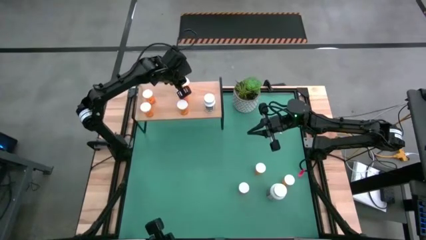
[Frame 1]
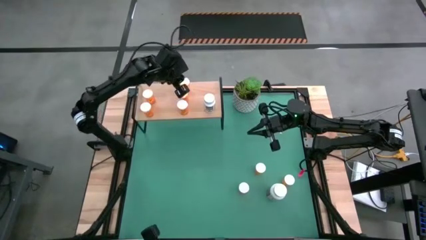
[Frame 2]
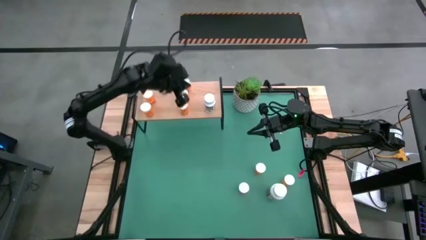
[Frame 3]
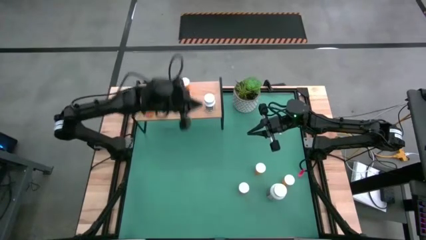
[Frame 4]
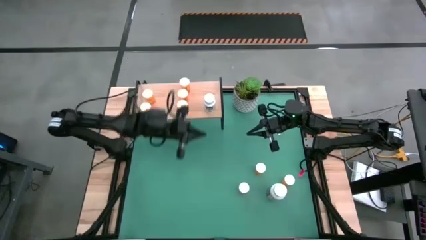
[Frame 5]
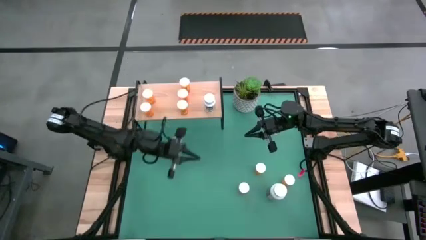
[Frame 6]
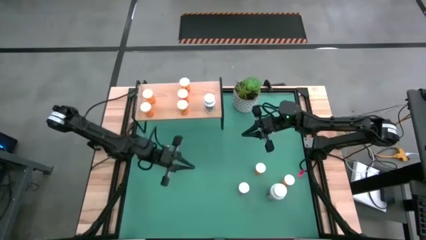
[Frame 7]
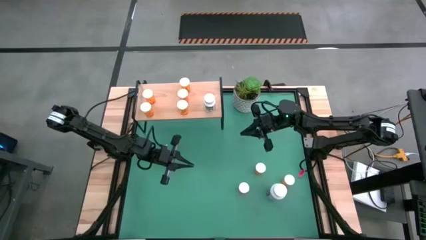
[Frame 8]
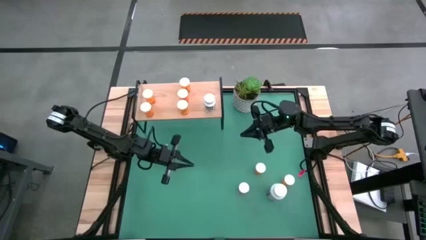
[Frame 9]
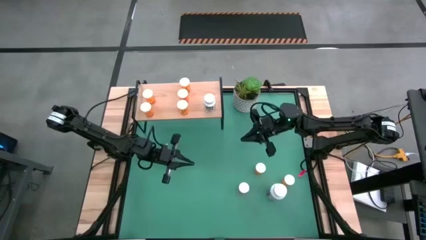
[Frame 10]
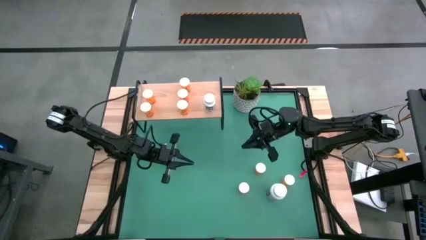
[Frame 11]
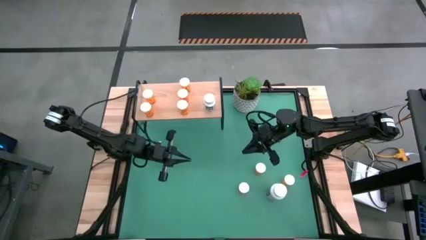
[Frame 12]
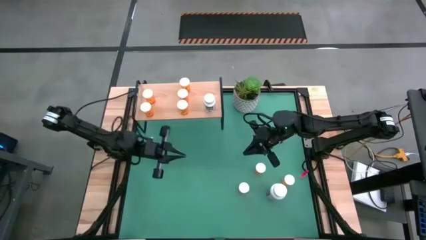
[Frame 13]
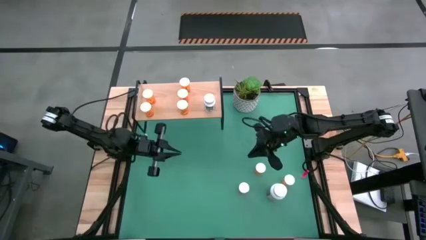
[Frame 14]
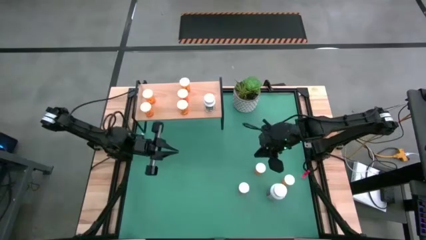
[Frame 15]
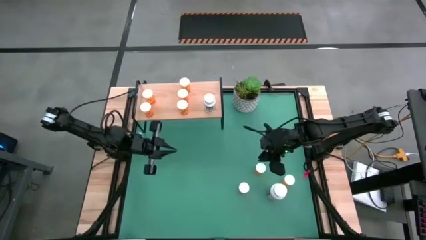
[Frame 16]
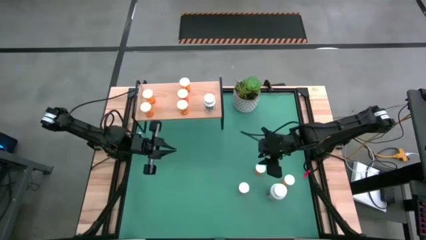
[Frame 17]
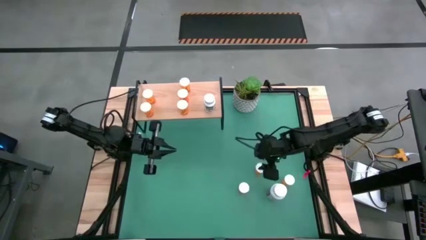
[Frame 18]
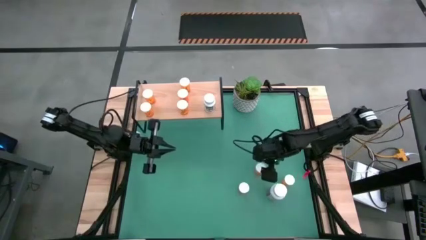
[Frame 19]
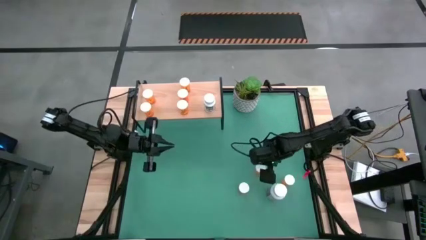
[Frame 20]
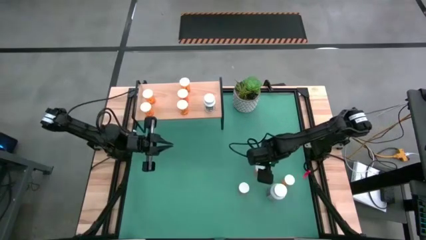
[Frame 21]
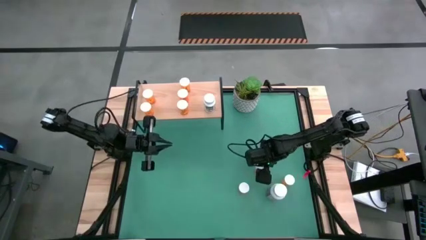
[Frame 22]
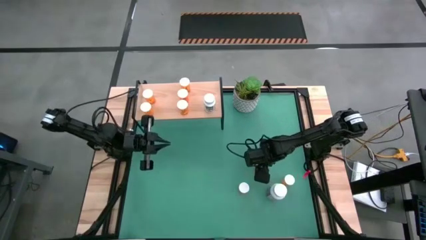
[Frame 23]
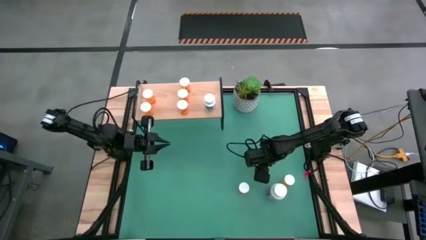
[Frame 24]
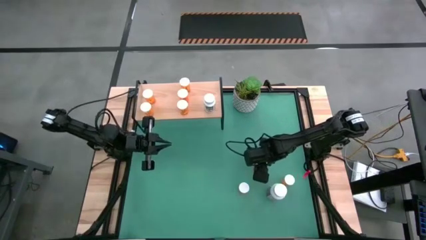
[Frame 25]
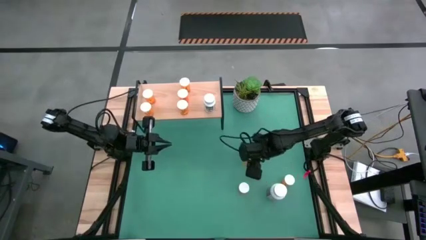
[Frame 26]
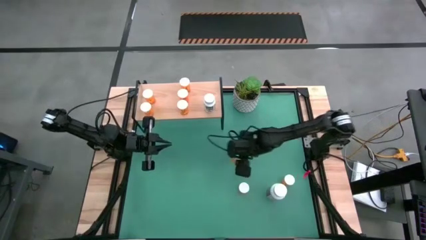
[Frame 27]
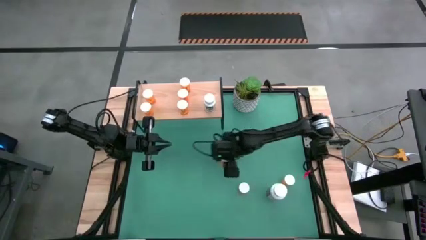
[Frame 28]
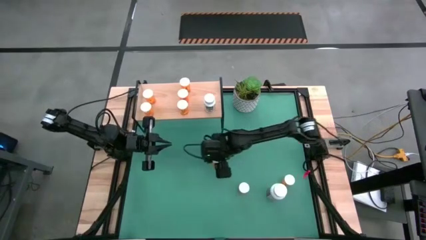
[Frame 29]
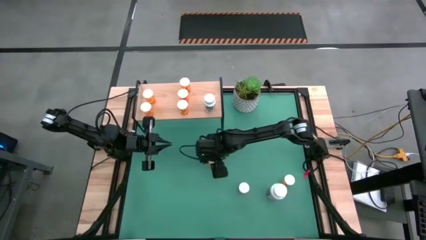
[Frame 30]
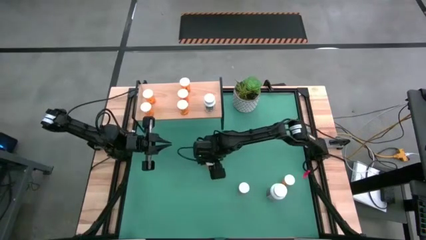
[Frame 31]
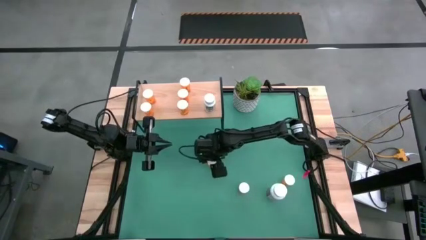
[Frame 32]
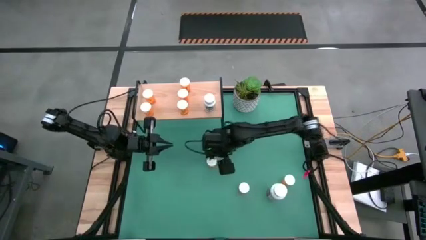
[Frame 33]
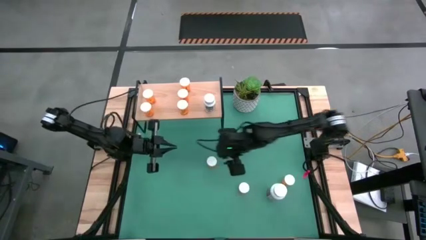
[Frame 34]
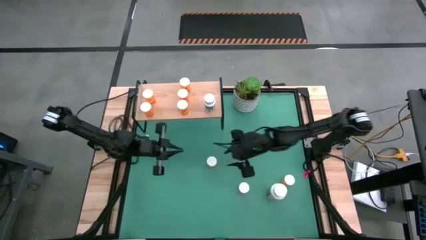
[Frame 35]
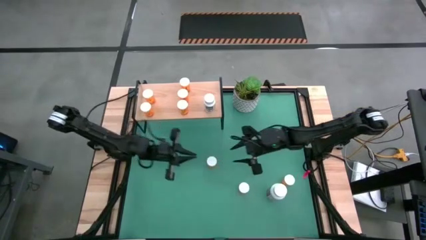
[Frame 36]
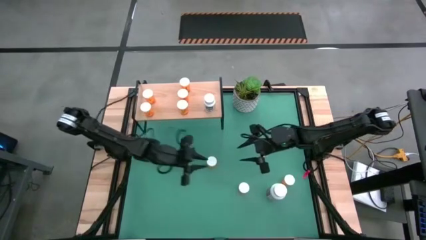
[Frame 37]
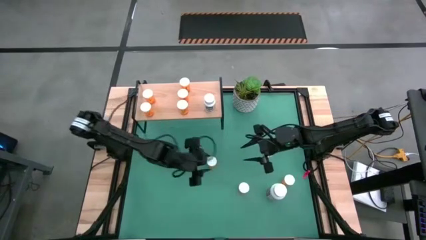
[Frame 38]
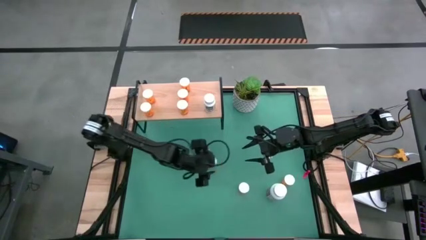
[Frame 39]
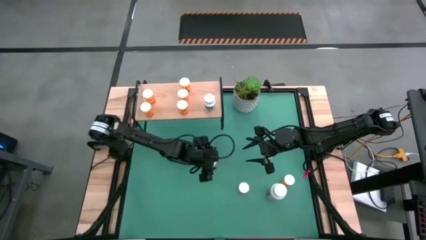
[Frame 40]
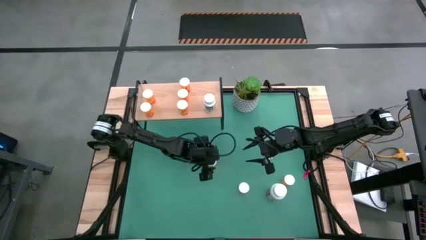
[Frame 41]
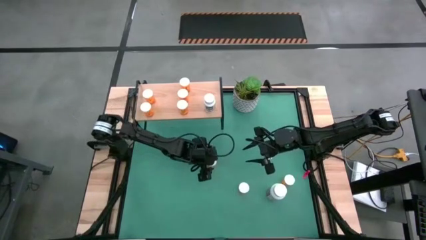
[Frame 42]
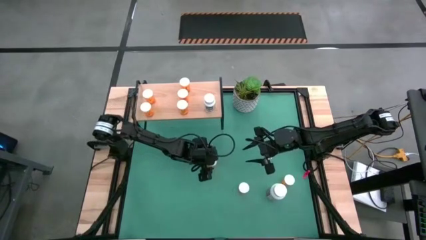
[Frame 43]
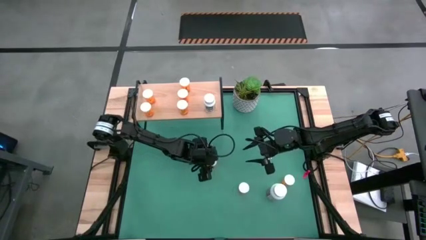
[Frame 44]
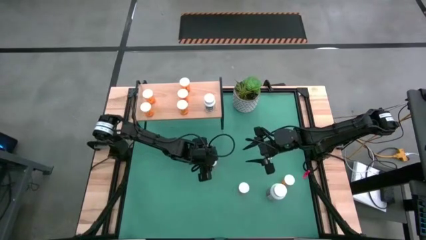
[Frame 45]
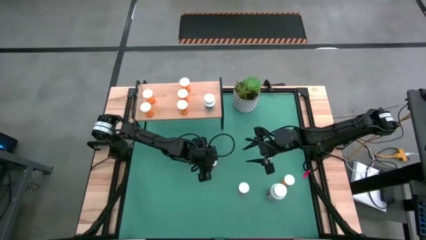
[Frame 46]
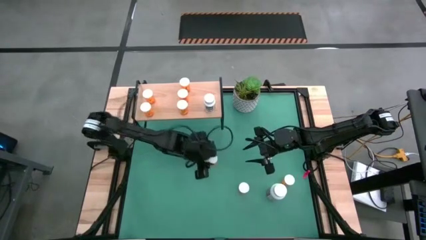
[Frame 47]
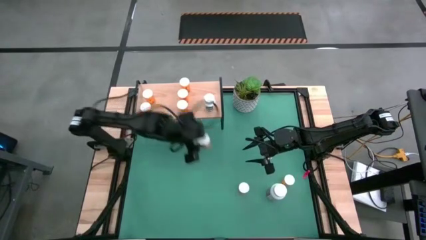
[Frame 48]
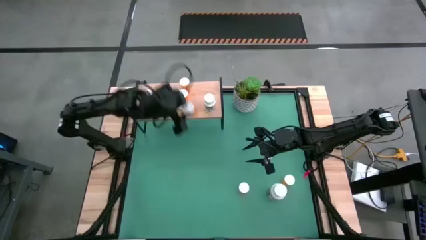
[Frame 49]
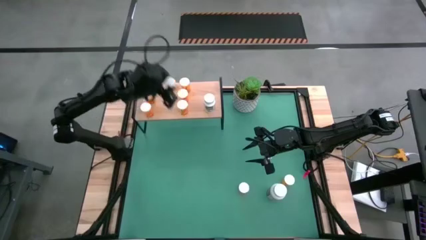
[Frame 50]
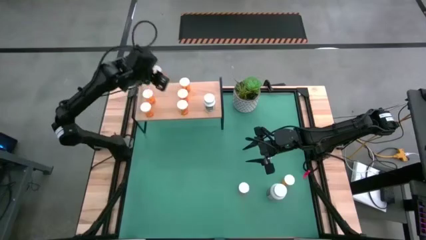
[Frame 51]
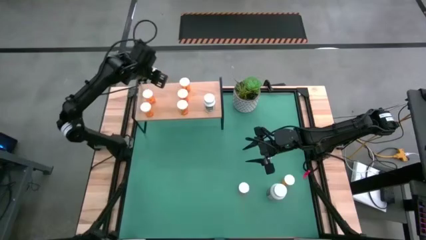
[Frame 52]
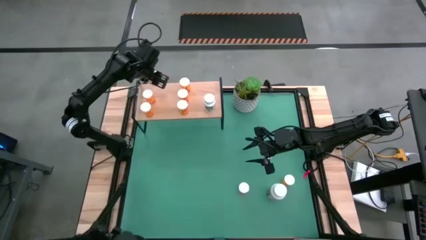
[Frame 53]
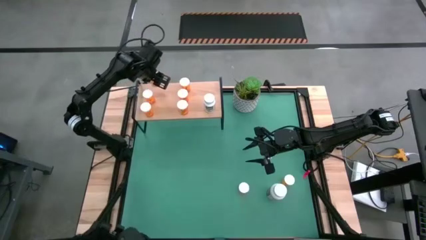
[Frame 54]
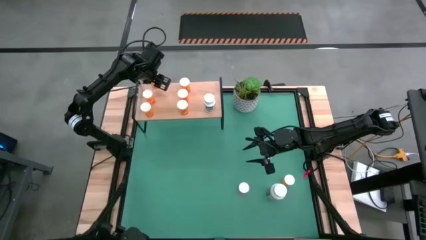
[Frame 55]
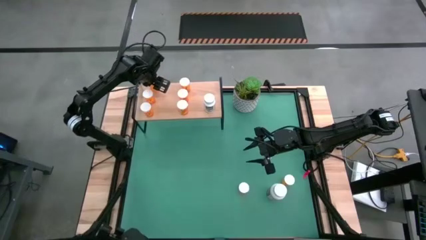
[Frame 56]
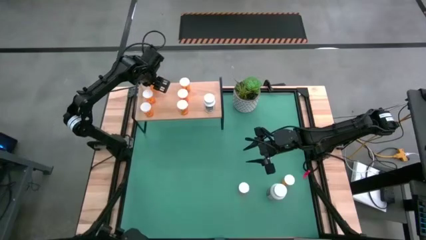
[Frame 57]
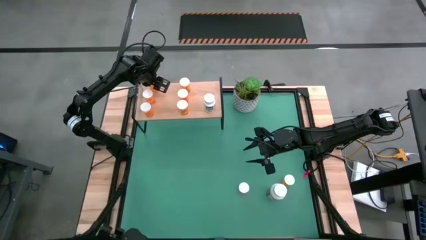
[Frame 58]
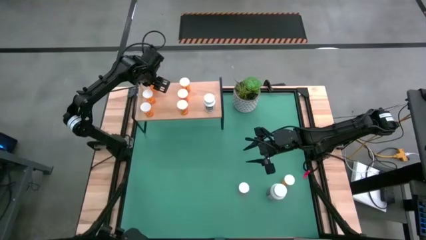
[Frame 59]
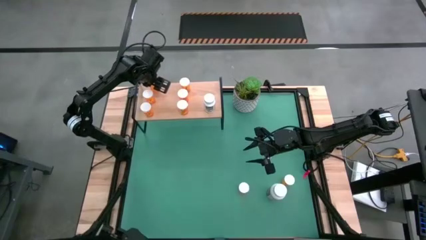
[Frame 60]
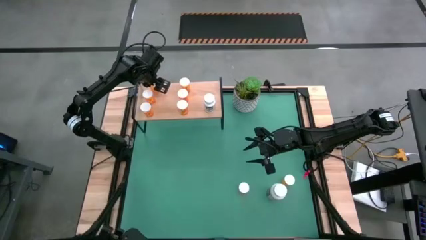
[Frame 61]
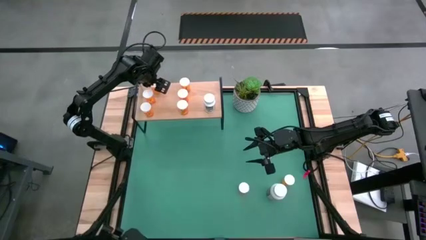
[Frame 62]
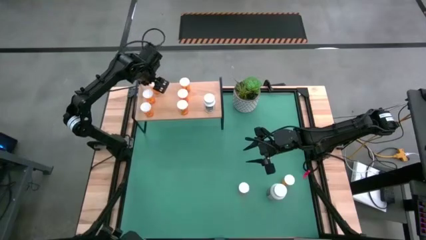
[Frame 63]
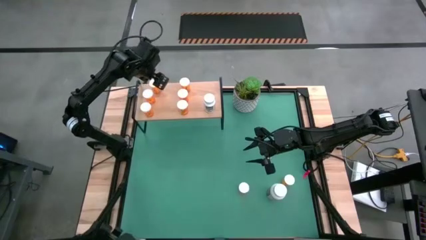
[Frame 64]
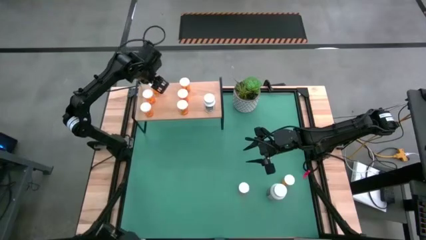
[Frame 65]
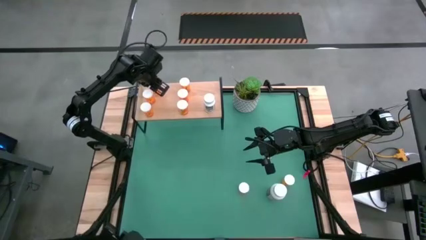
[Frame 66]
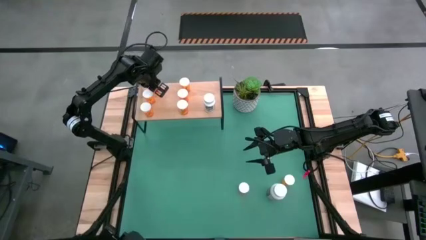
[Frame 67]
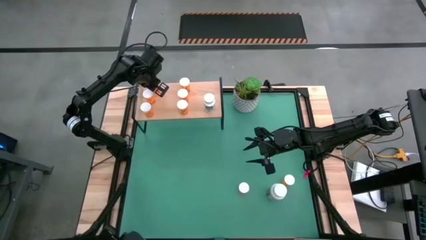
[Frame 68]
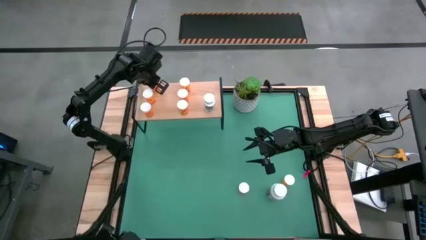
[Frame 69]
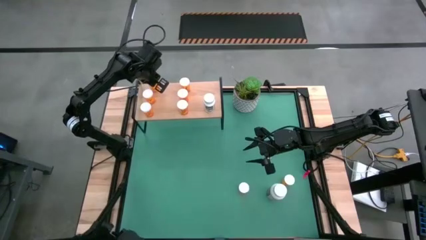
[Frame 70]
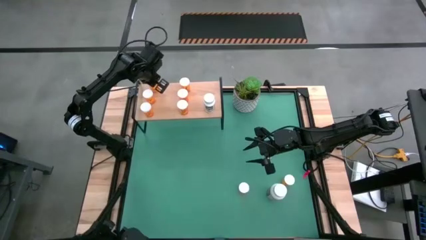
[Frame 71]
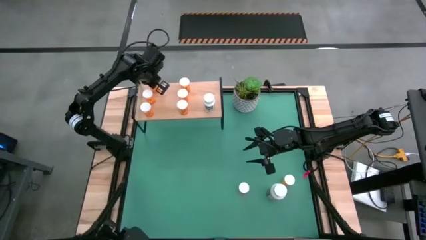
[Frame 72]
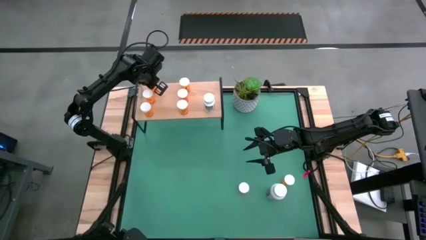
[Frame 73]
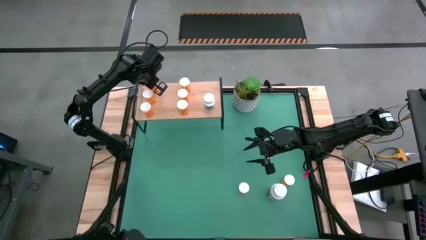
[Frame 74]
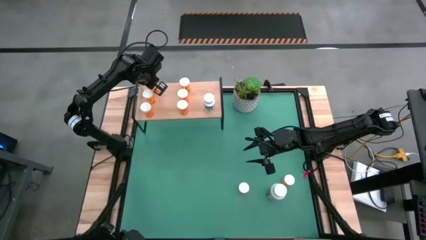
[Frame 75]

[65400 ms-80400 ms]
Task: Pick and place medicine bottles onto shelf by color
Put the orange pill bottle on the shelf aligned with the other orange pill bottle
